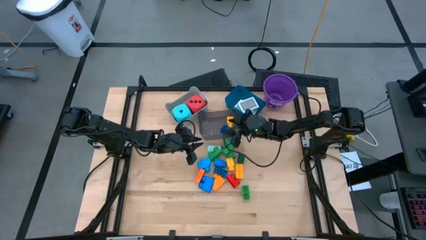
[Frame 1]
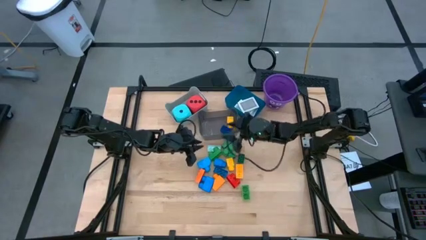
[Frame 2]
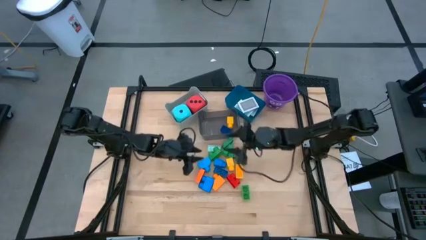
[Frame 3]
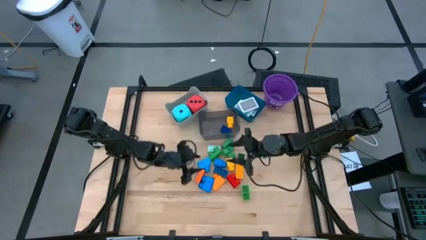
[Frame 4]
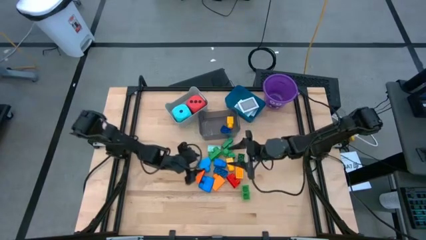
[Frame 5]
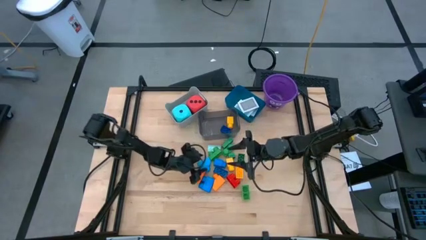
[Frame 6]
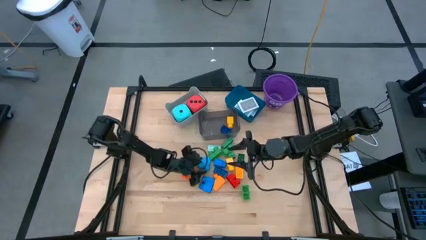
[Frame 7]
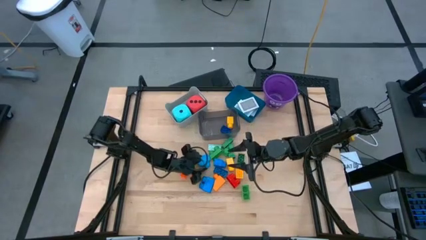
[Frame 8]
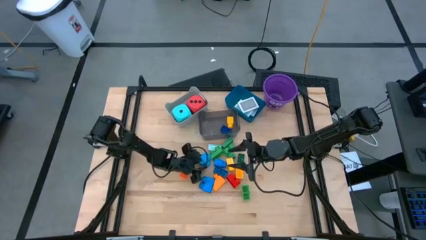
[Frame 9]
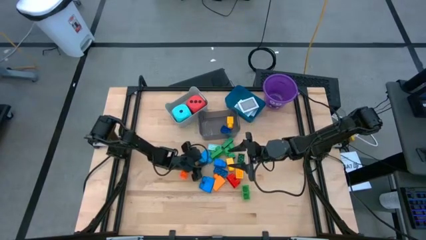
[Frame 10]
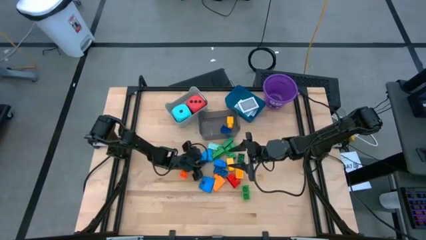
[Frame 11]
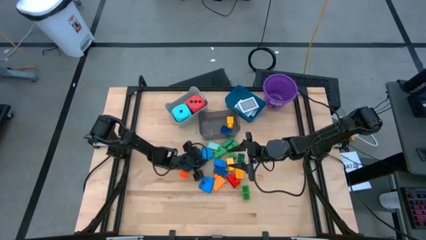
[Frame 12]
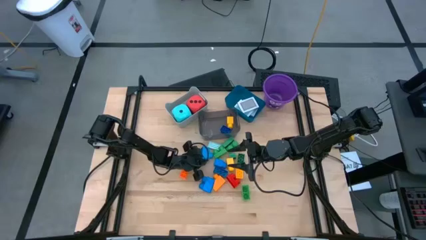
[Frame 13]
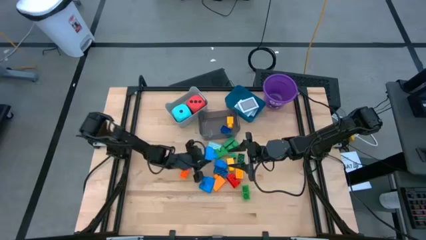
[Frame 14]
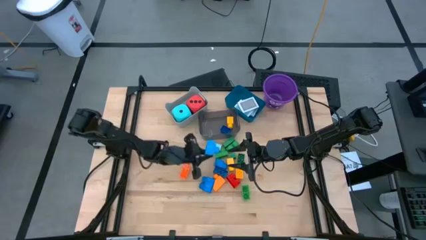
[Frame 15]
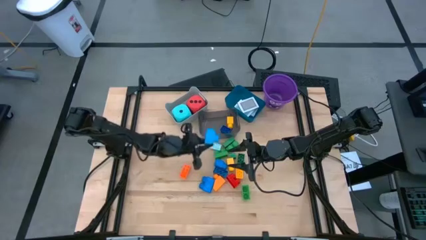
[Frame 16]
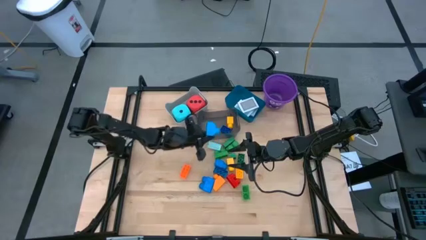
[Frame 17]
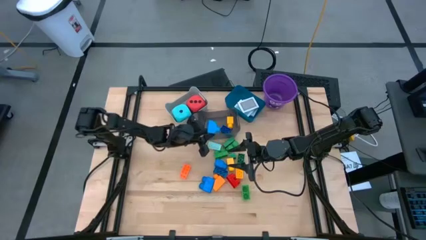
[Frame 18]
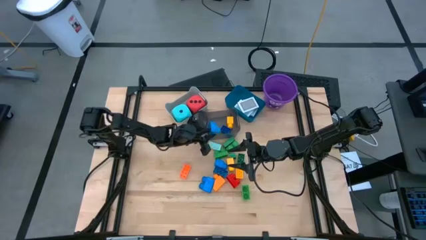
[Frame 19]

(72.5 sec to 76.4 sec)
Task: Pick & Place Toys
Put the blue block into the black bin

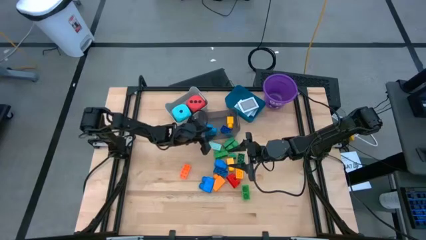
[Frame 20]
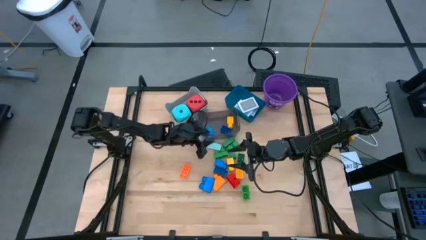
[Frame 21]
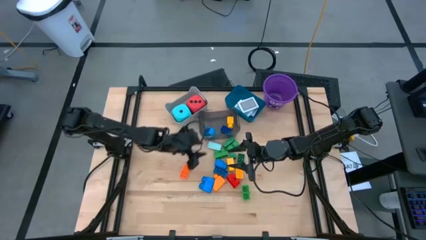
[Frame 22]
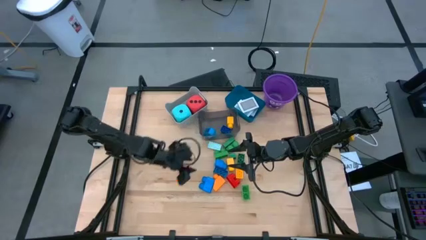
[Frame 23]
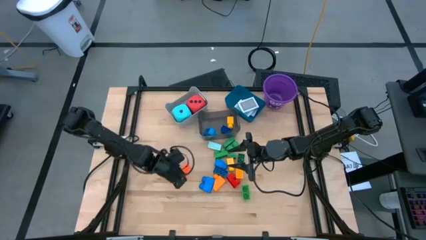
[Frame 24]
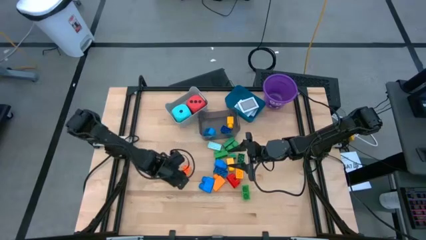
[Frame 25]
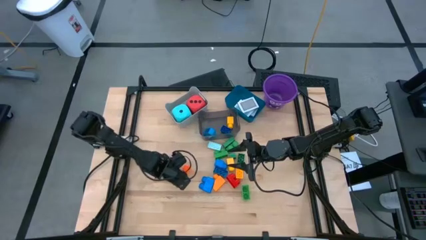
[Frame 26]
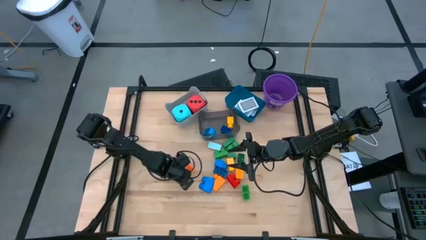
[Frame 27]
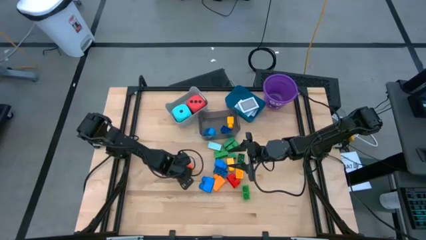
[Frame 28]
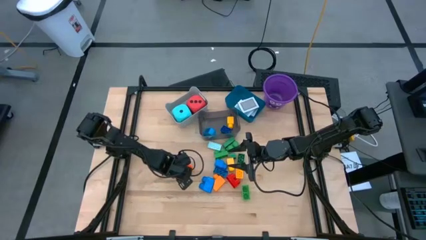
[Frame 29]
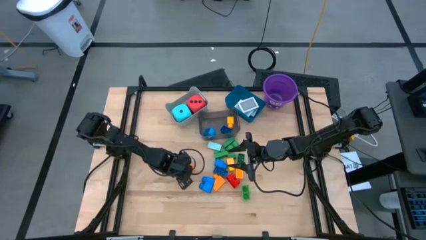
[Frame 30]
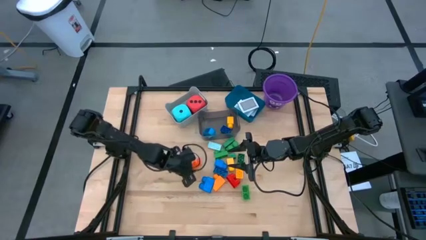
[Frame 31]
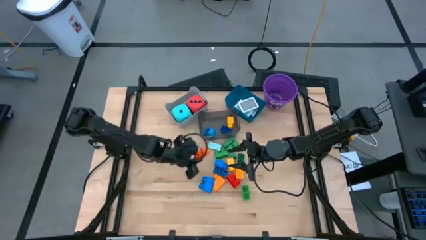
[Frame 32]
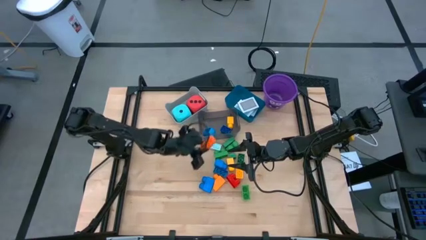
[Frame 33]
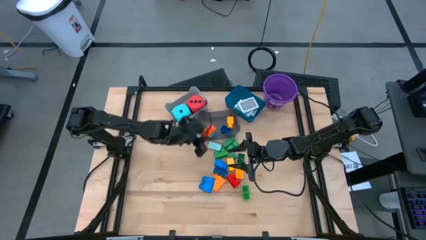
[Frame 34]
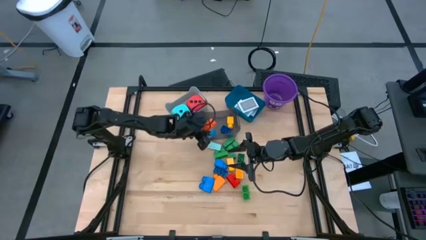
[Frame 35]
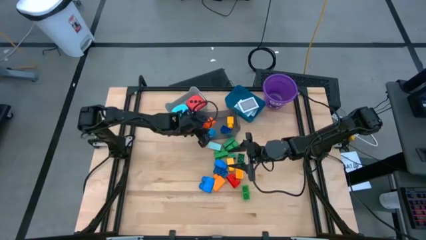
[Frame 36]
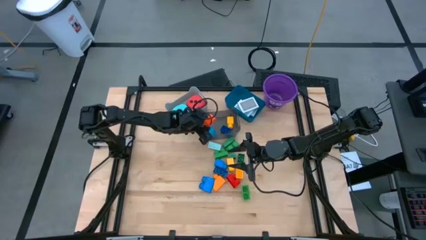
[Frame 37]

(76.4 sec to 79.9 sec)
Put the orange block into the black bin

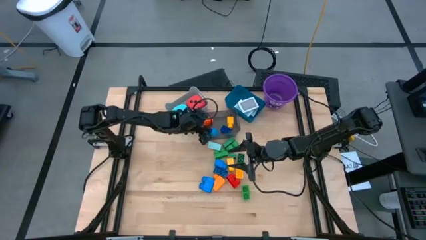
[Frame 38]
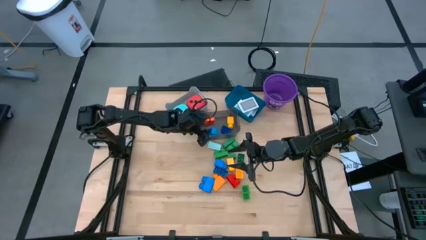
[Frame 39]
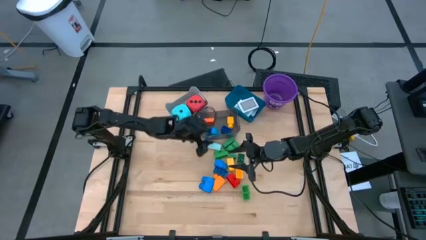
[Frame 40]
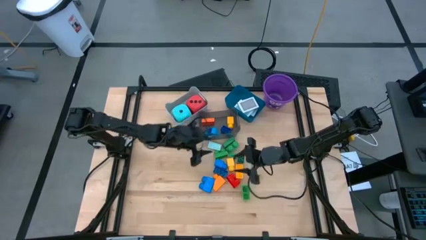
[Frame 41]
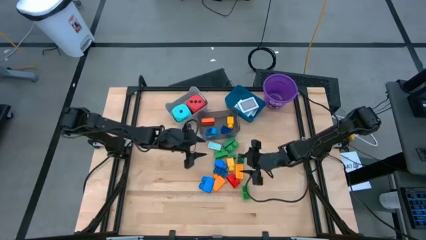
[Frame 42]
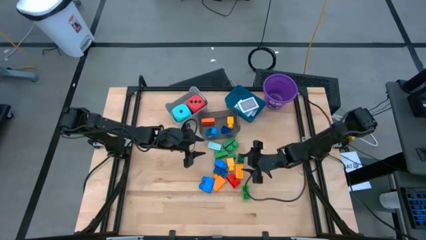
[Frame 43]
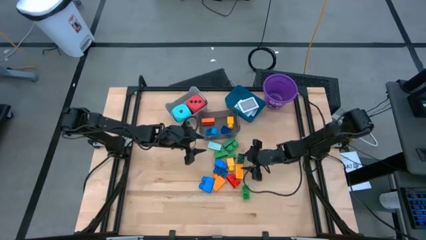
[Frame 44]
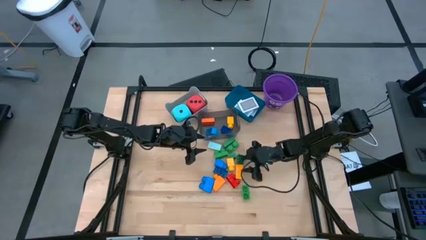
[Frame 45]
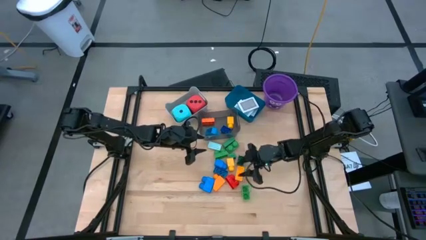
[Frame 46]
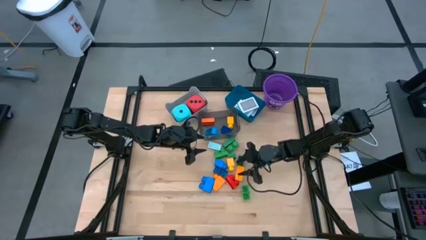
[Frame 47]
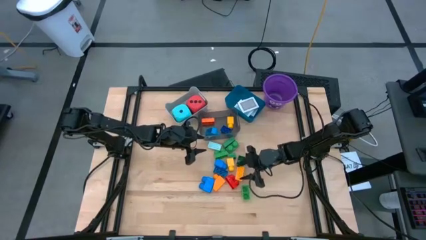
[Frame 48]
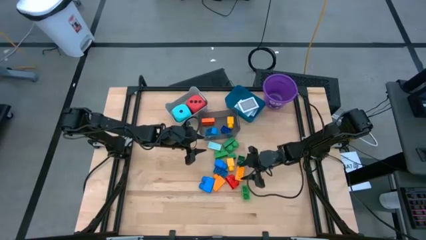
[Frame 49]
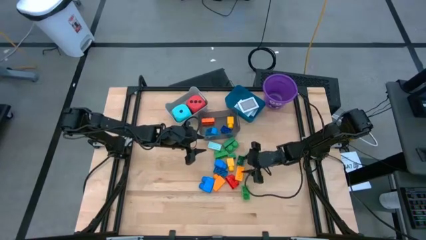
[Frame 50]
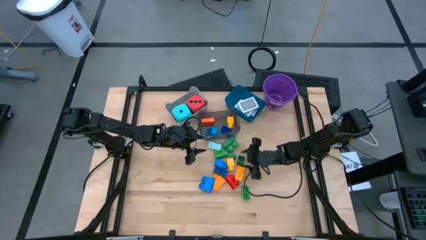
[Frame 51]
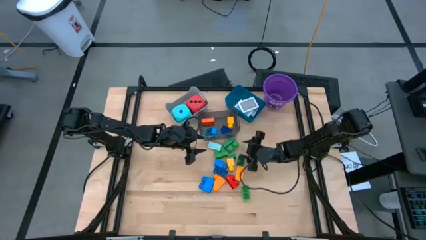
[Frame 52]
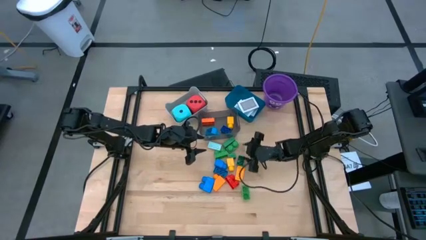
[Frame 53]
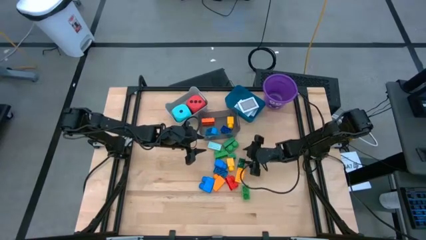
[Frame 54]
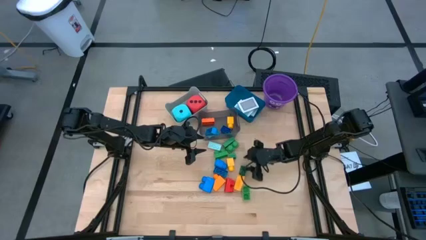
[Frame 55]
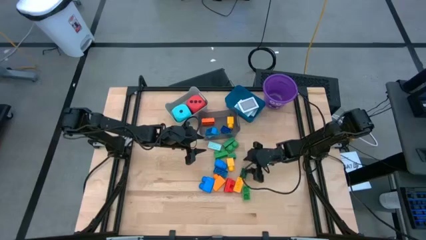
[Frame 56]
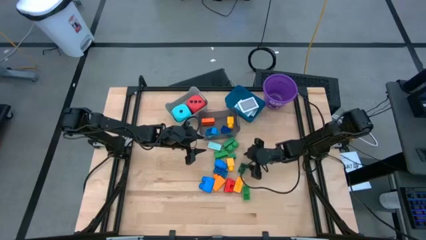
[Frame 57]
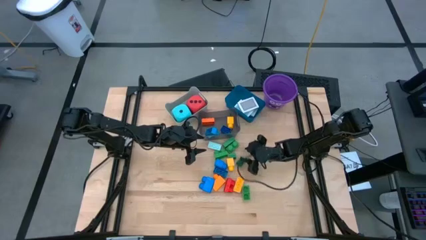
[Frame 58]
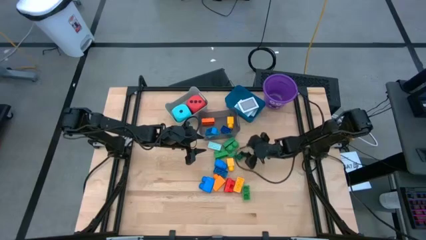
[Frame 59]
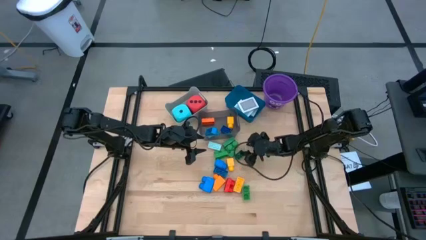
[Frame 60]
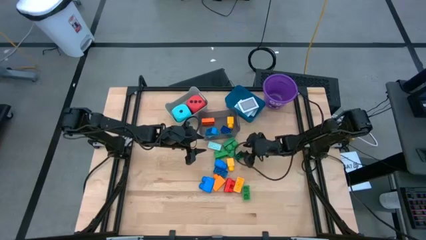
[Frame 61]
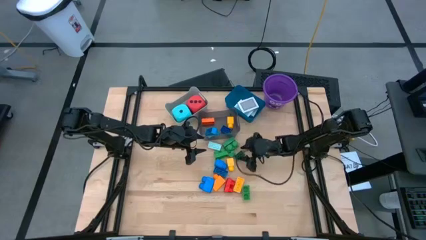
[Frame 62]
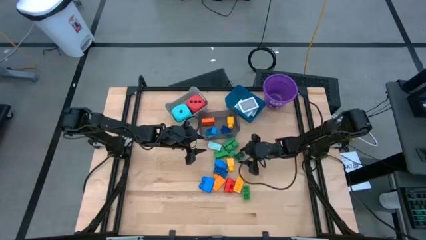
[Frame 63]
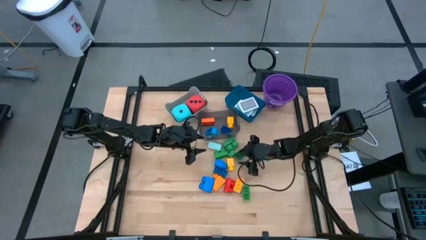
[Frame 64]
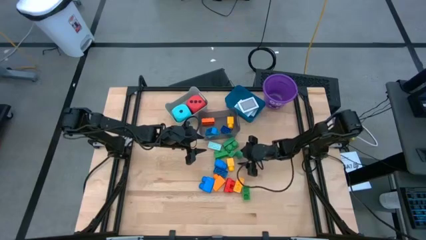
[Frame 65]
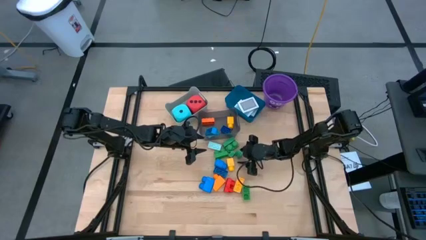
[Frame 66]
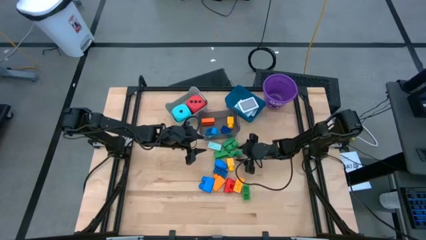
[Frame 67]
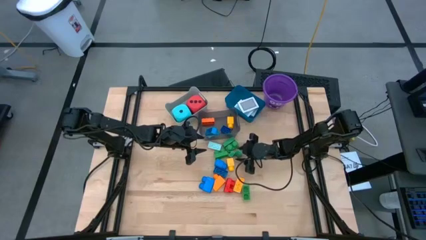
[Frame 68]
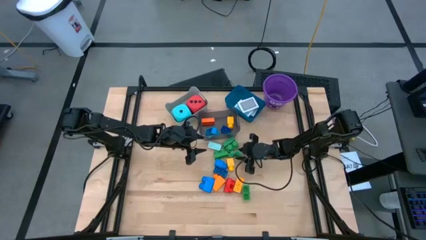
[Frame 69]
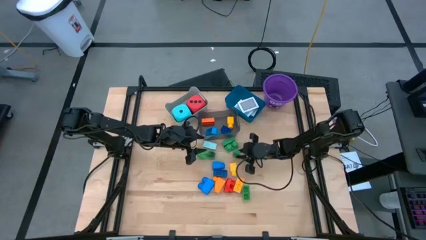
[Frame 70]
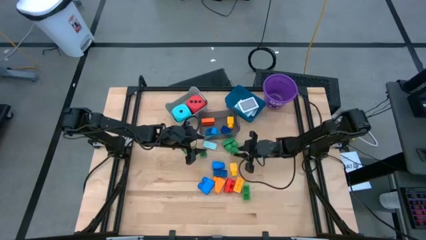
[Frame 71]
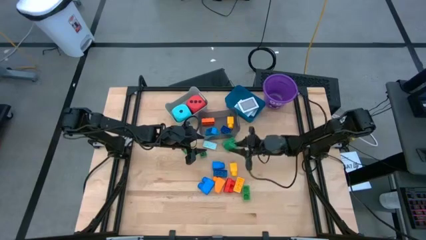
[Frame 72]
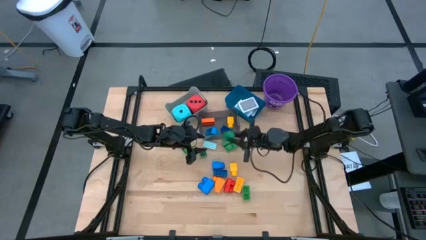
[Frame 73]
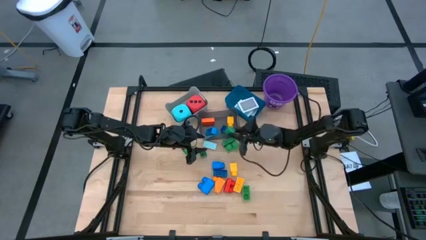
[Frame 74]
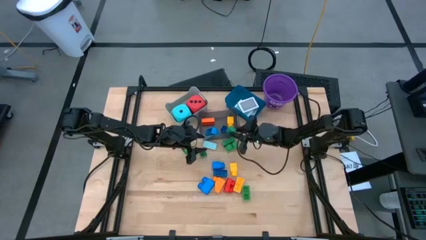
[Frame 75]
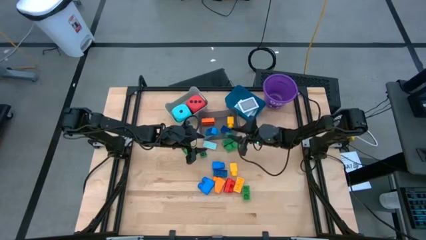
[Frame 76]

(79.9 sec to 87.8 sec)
Put the green block into the black bin

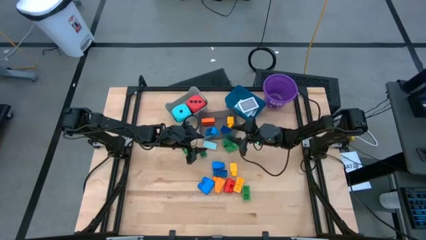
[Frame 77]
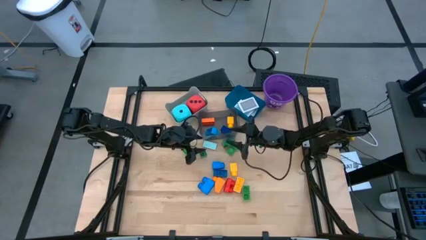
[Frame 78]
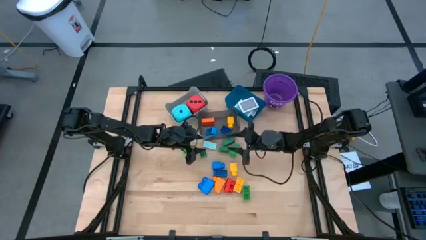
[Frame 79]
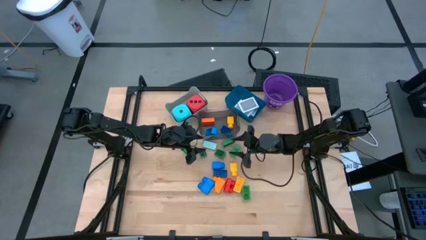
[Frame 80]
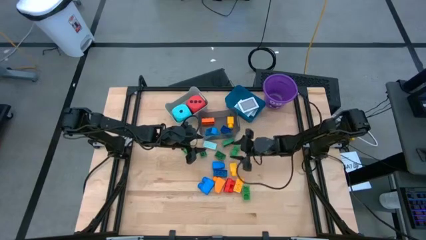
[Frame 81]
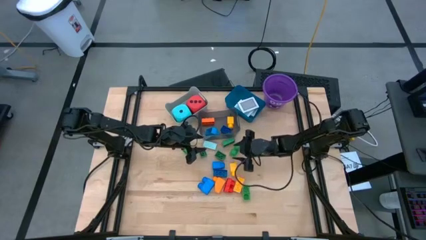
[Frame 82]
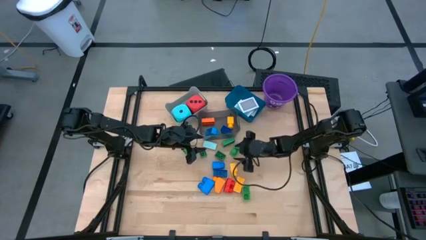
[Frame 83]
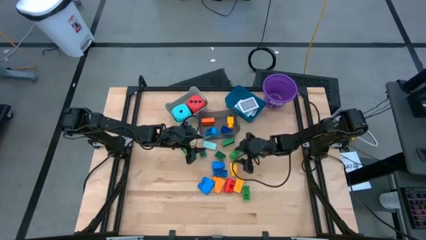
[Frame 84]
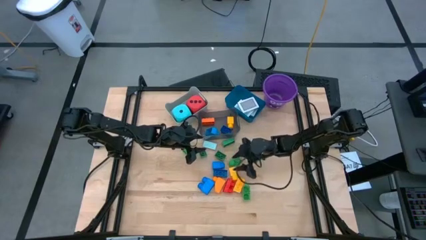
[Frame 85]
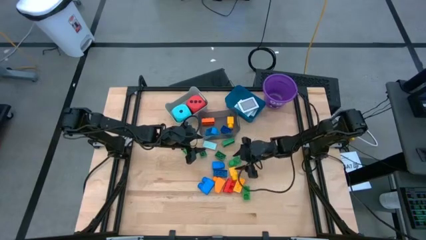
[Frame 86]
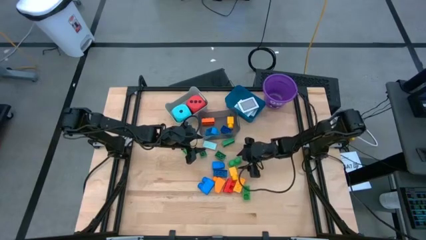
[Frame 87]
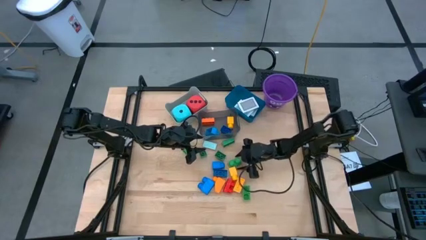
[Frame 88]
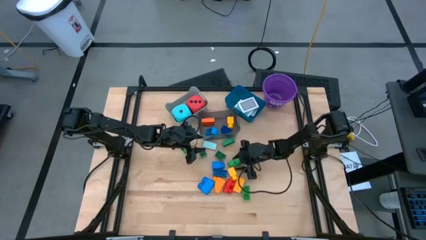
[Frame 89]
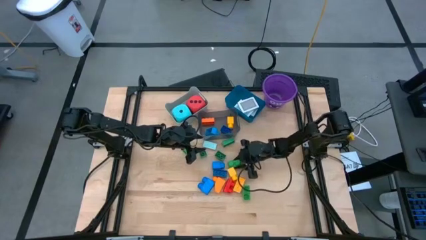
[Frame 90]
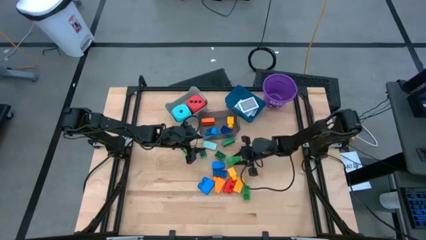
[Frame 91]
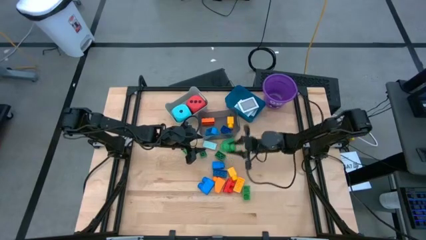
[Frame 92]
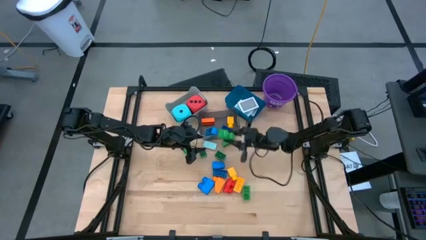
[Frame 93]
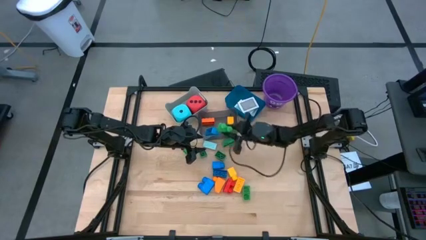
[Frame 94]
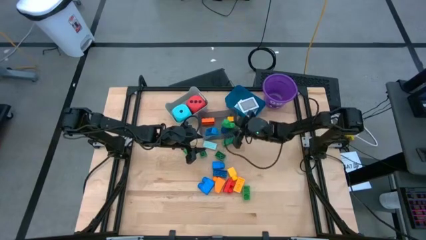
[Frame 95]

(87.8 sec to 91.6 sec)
Put the green block into the black bin
